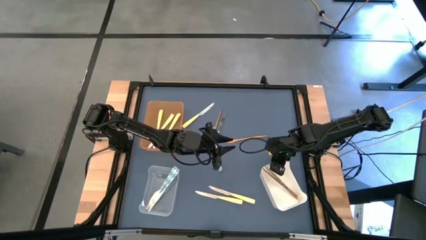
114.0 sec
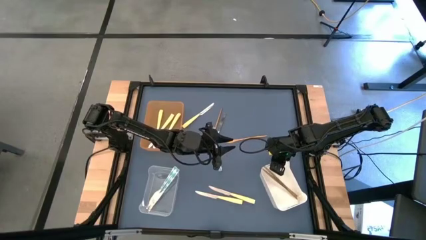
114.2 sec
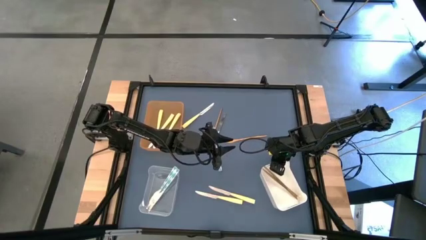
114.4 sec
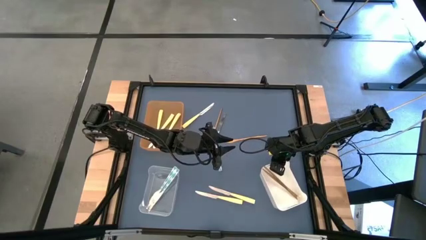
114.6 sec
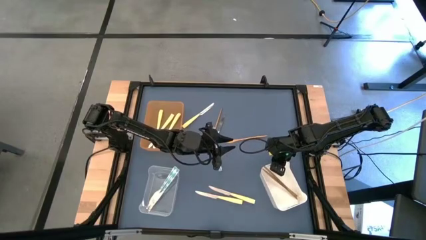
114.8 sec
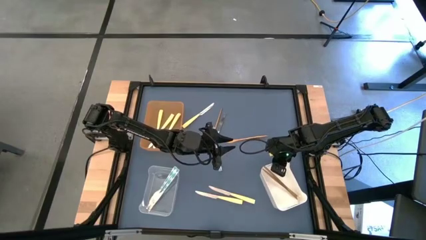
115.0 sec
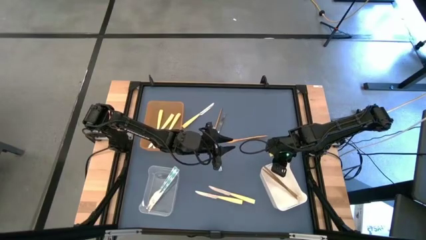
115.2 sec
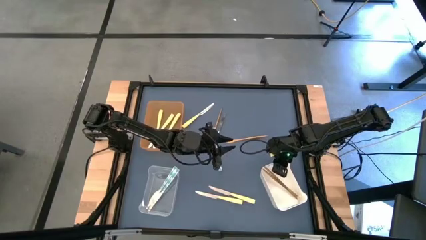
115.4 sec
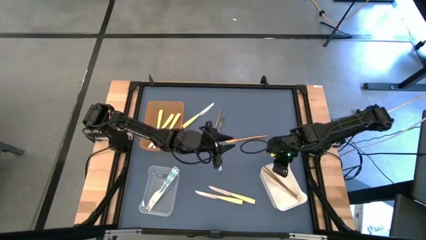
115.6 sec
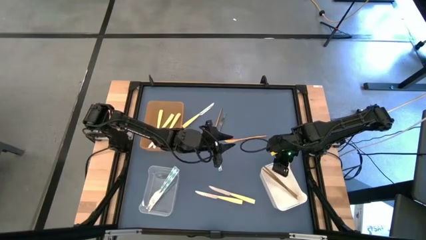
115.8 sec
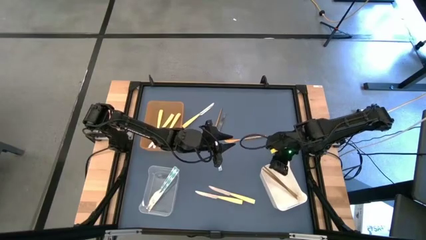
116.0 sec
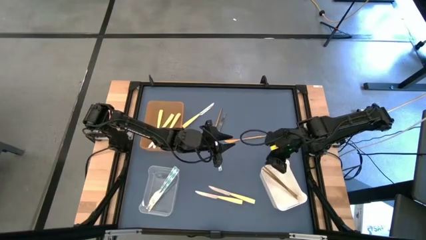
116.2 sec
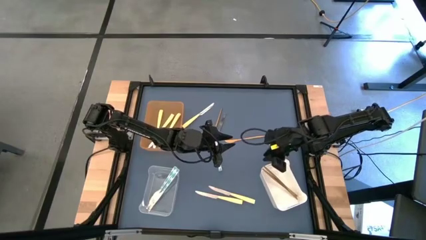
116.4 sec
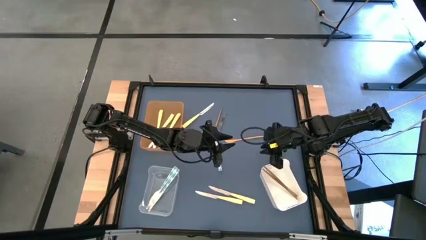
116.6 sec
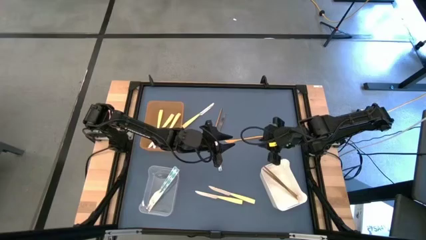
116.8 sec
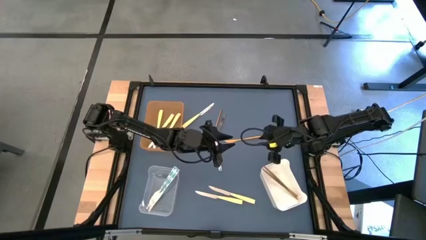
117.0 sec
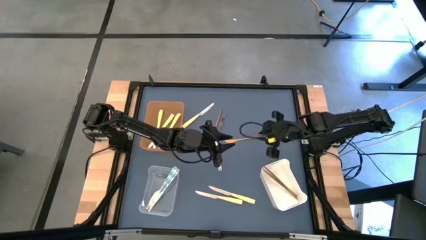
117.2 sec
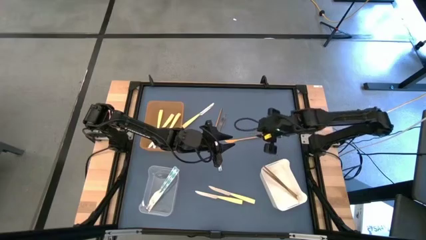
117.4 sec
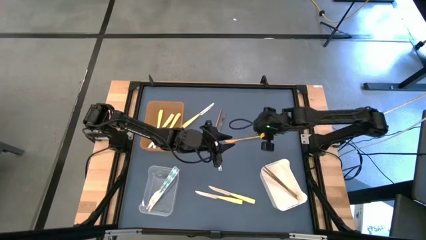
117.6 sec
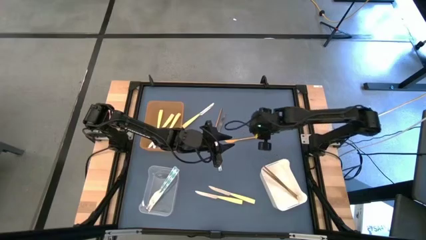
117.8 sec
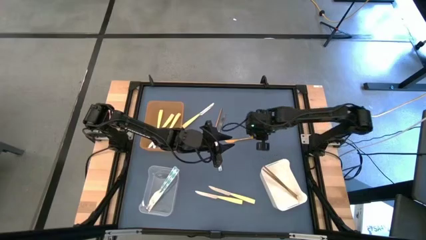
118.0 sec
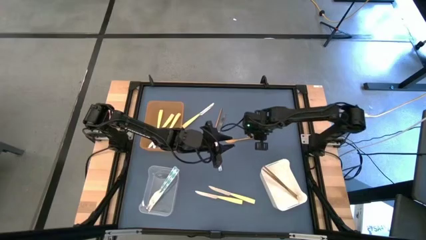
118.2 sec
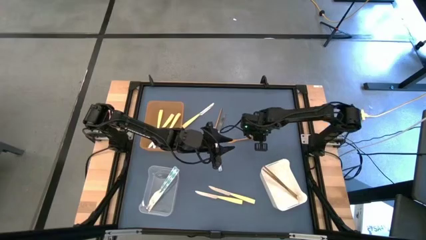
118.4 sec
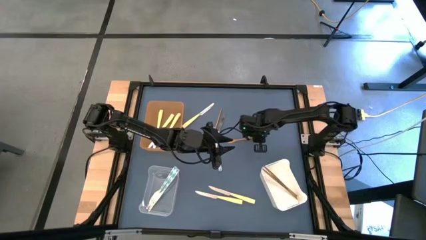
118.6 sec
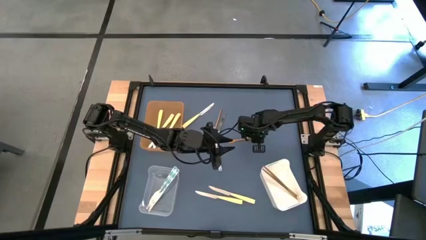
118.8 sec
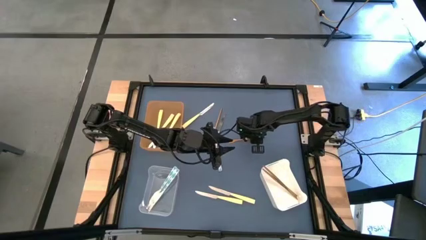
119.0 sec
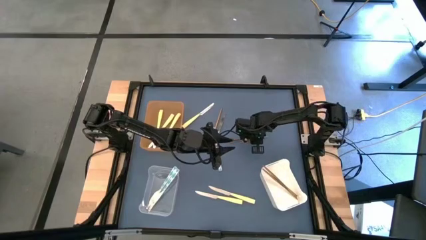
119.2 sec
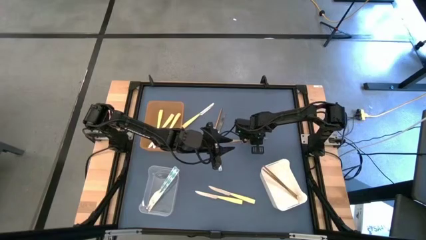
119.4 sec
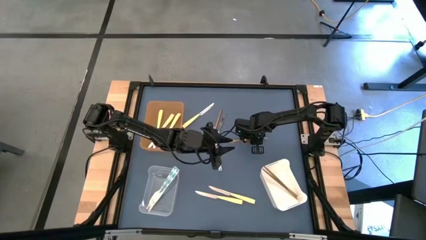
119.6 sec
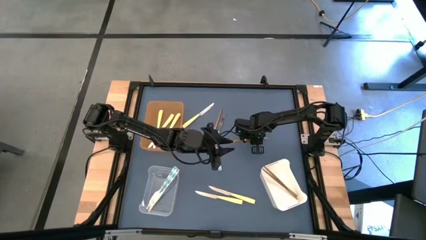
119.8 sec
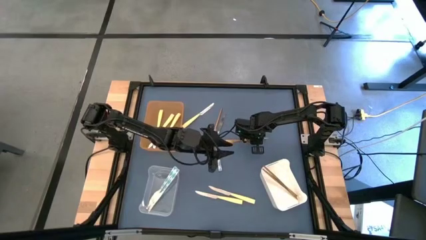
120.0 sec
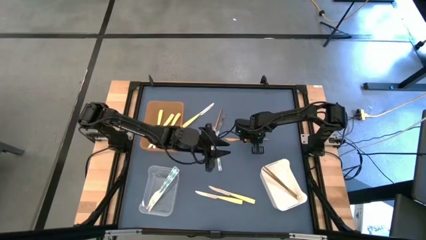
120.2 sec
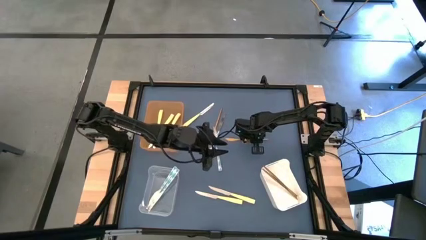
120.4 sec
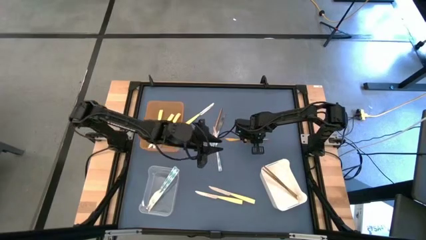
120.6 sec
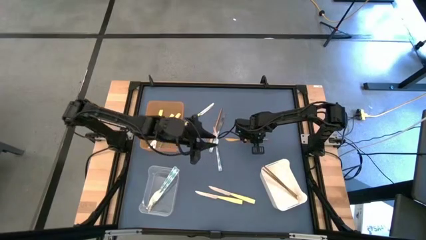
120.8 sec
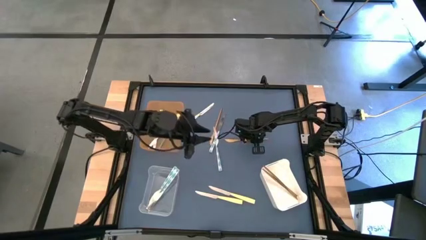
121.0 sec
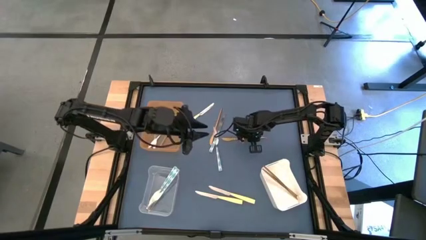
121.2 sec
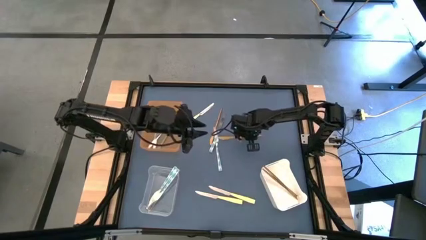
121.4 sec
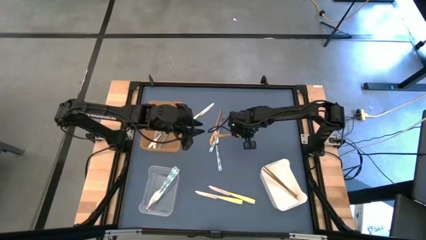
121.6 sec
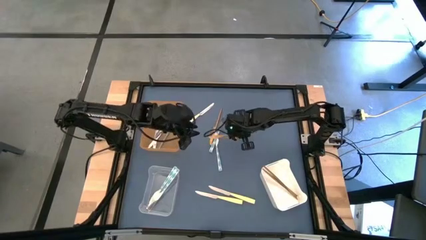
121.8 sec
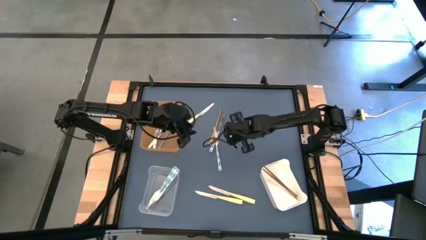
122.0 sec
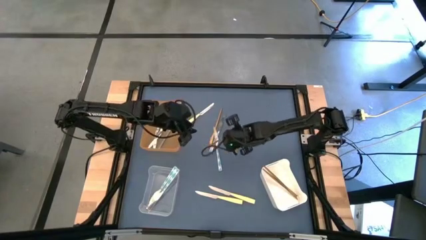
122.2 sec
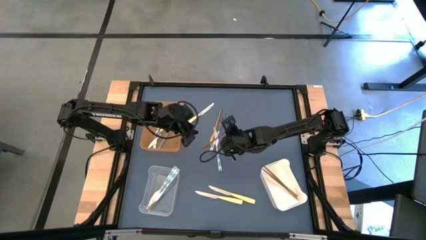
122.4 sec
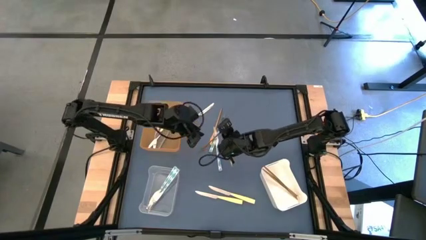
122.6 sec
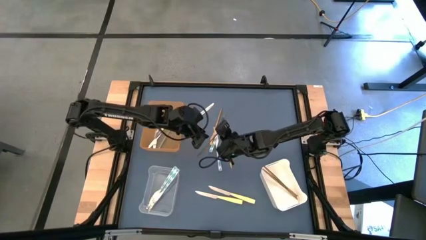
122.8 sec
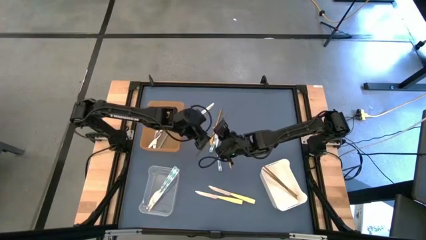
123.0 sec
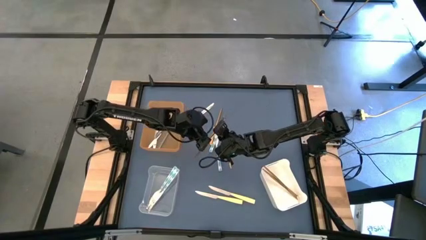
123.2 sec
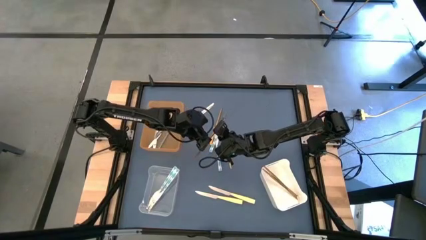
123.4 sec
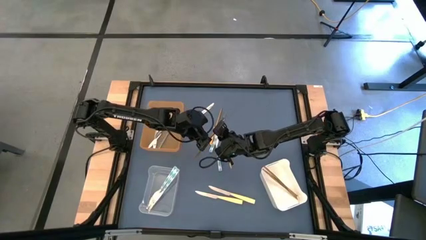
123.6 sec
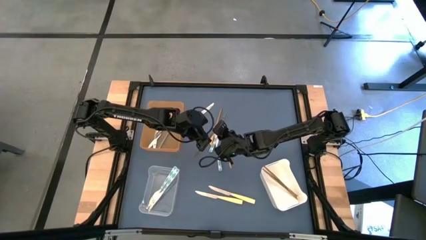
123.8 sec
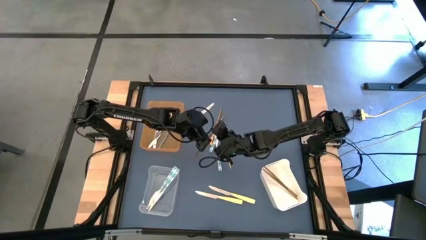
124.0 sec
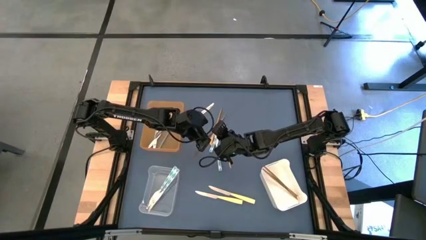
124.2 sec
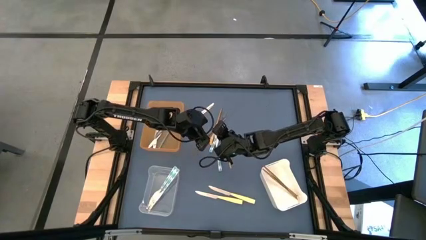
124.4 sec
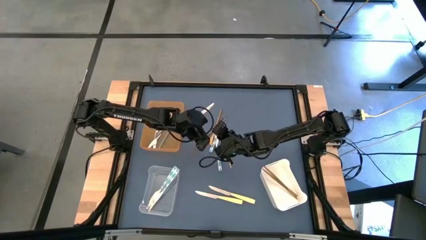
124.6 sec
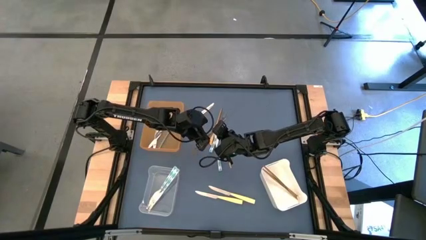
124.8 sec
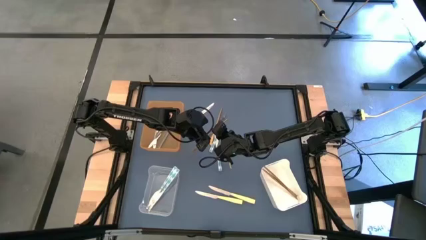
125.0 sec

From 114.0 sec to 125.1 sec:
Task: Sort silverware by color (type)
Put the gold knife into the white bin

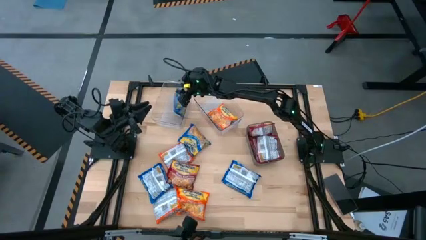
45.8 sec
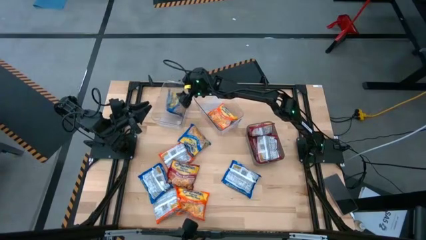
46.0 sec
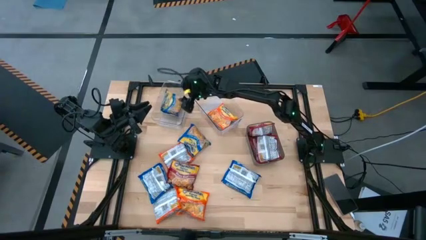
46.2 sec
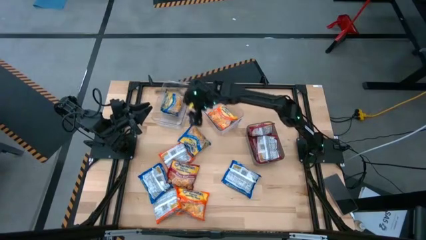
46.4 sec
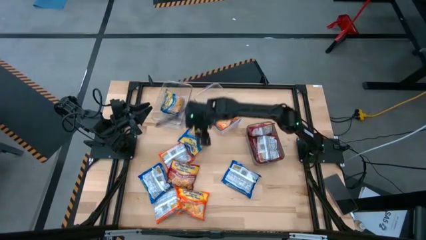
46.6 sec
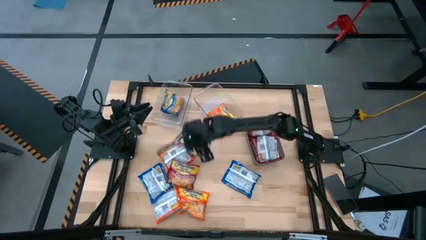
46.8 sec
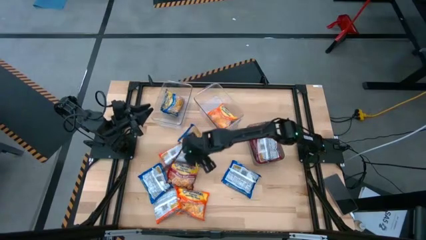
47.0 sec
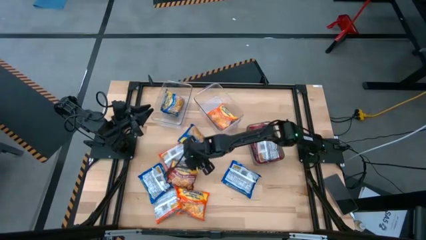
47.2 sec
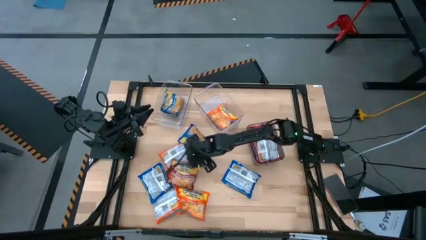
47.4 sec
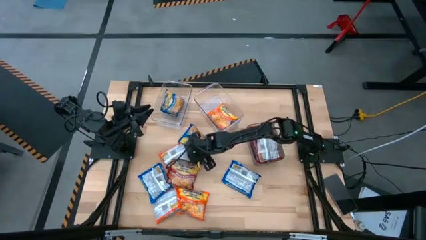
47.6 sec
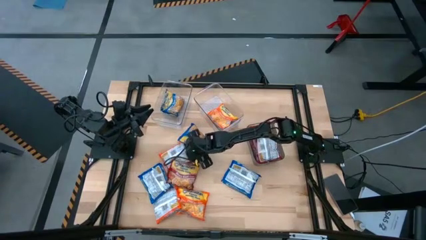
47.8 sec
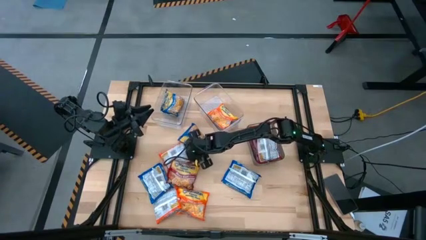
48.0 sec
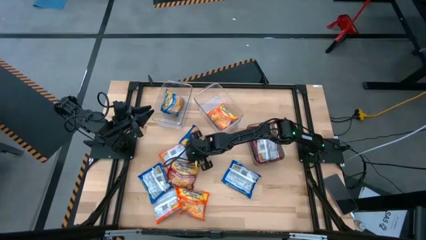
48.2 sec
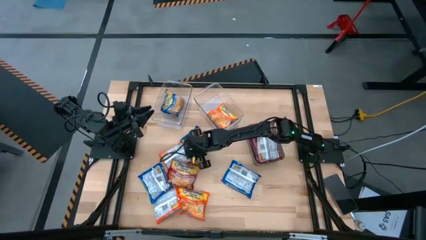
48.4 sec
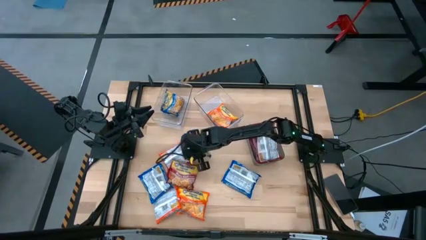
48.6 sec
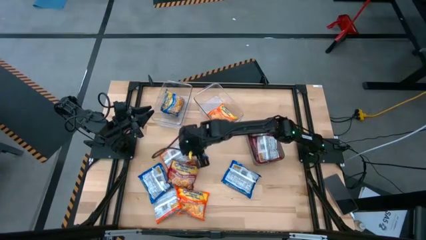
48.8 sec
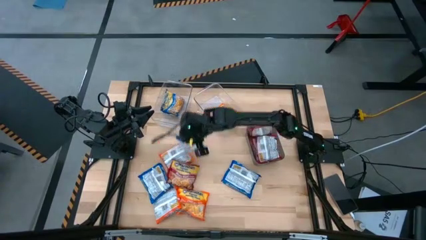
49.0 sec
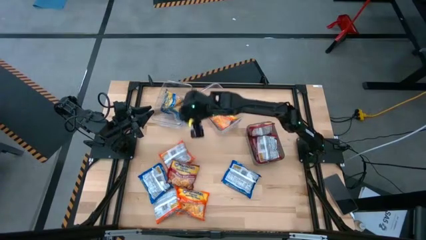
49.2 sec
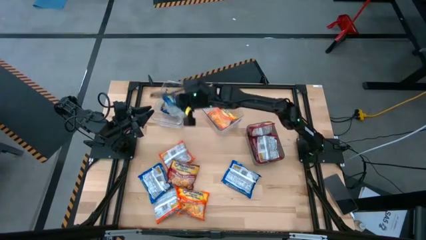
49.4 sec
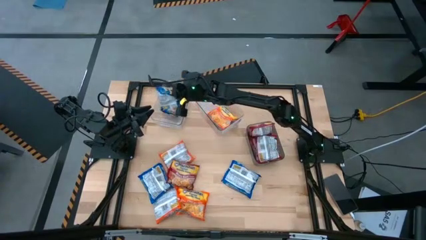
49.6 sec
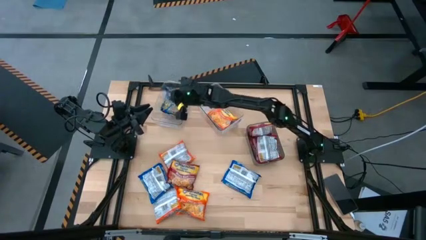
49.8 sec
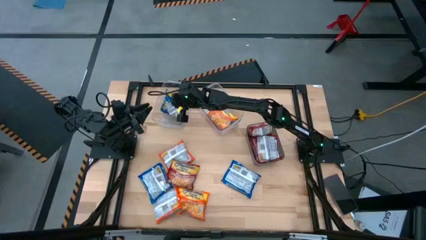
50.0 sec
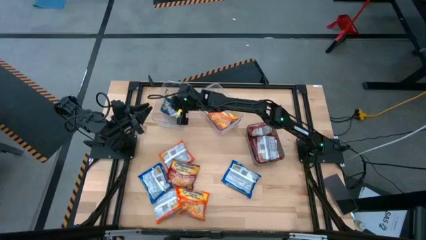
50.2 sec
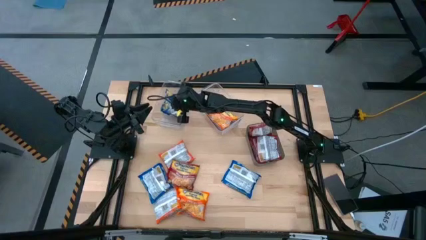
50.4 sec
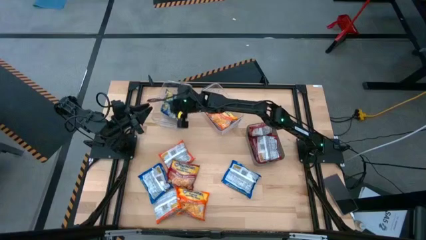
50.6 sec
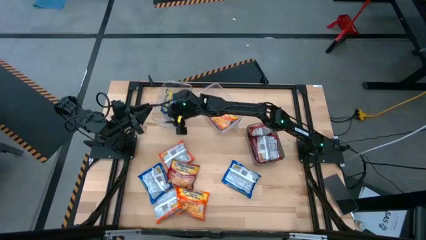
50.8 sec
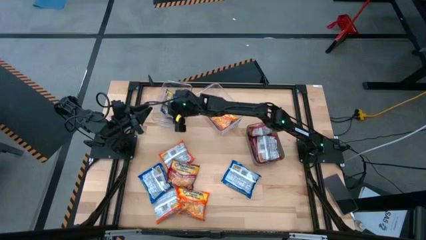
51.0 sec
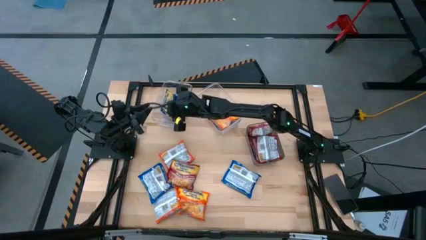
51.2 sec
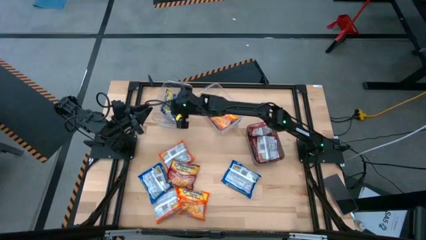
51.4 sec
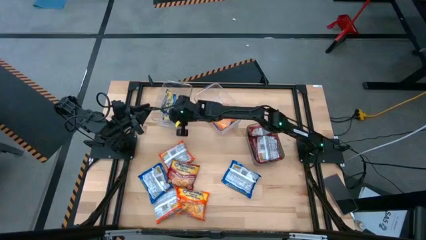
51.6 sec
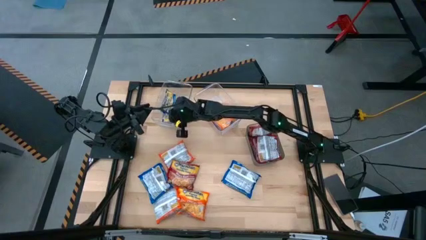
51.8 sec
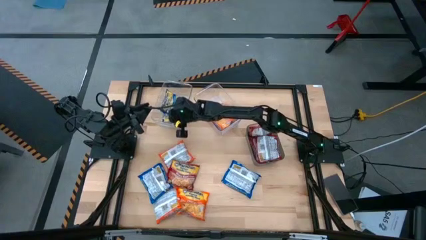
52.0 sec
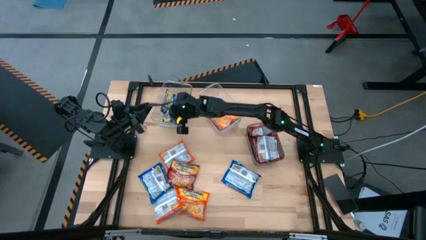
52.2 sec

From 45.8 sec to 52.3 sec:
Task: Sort Maruchan noodles
Put the blue noodle pack into the left transparent bin
